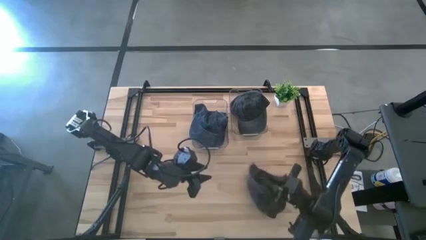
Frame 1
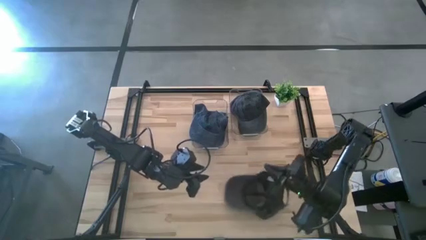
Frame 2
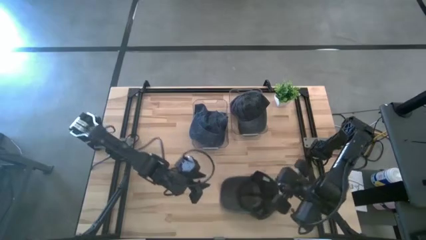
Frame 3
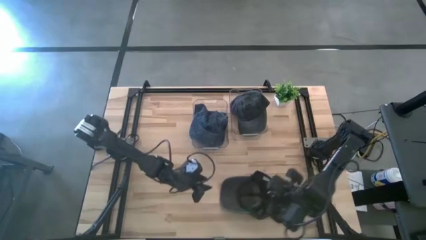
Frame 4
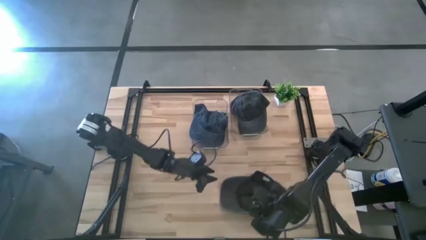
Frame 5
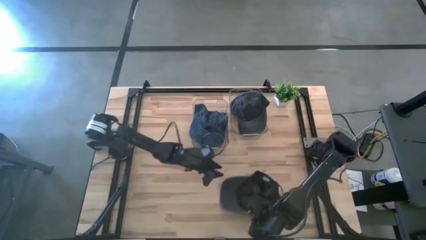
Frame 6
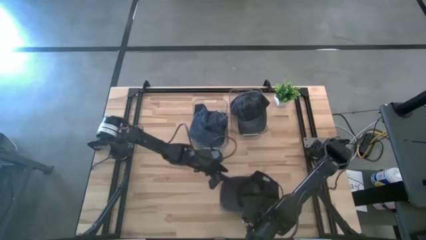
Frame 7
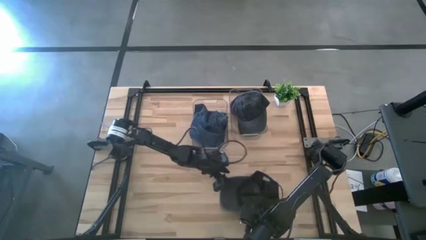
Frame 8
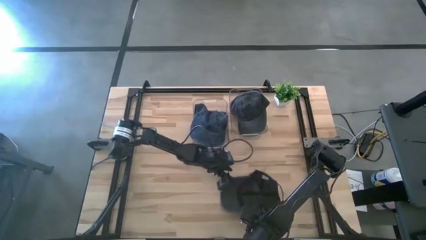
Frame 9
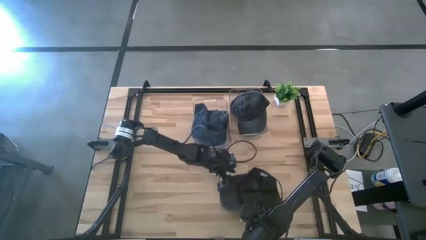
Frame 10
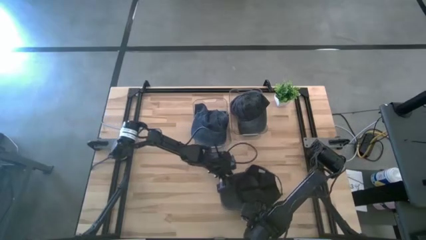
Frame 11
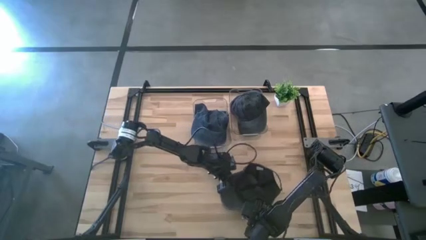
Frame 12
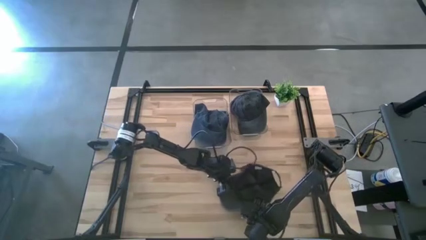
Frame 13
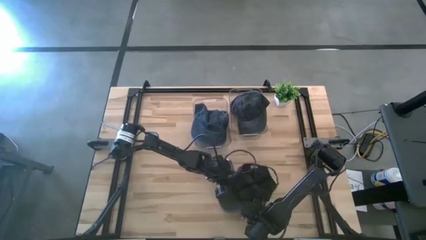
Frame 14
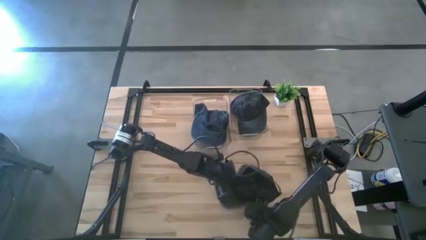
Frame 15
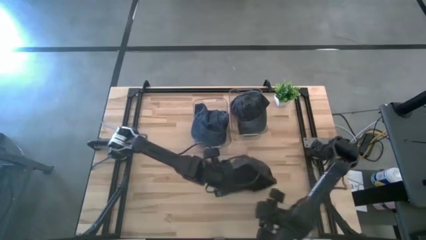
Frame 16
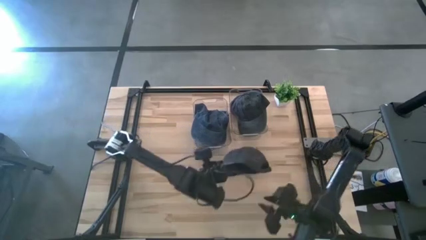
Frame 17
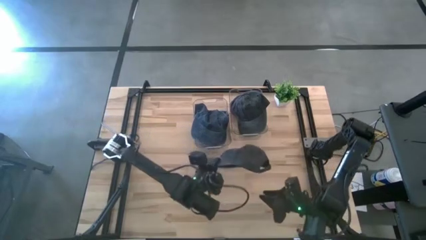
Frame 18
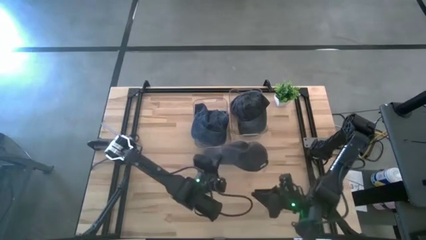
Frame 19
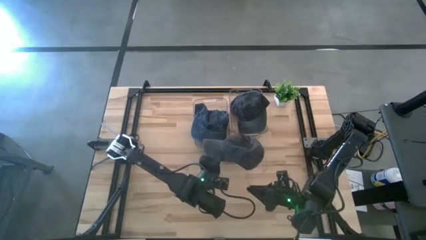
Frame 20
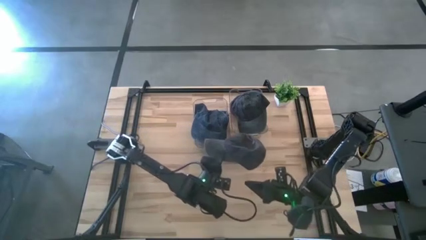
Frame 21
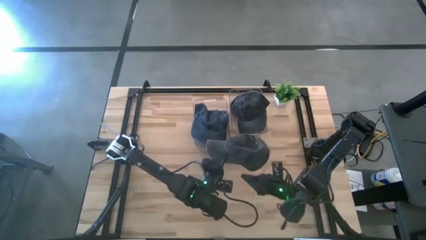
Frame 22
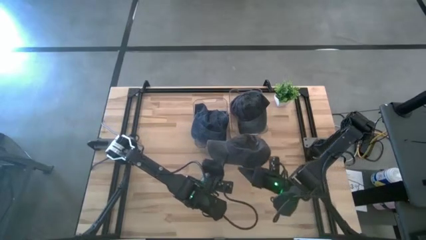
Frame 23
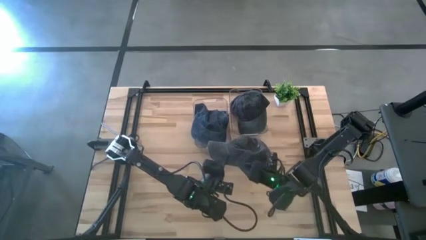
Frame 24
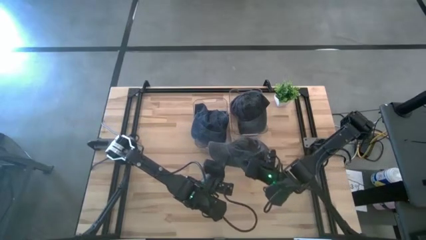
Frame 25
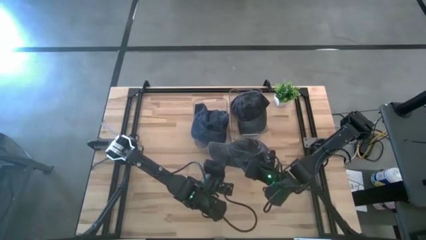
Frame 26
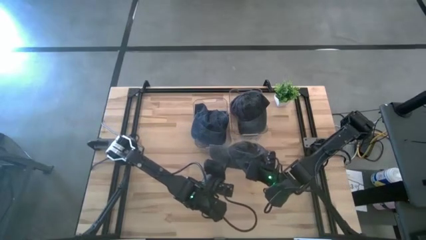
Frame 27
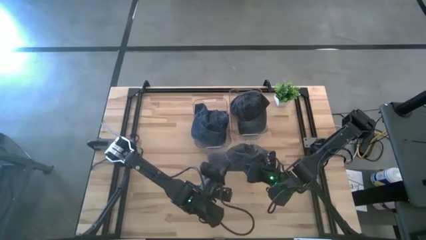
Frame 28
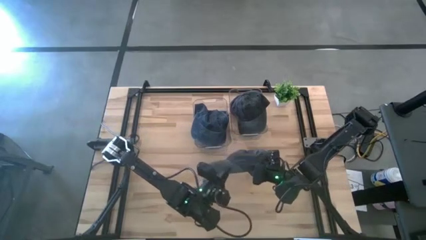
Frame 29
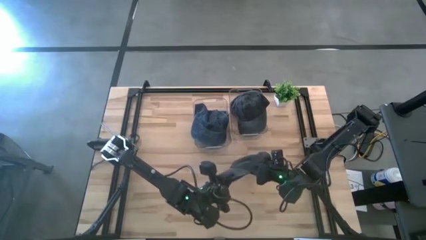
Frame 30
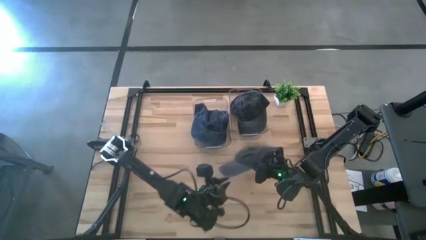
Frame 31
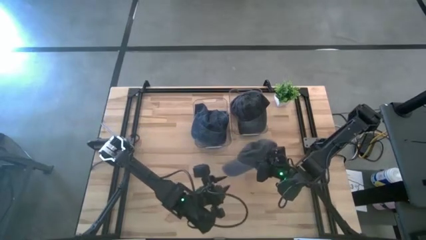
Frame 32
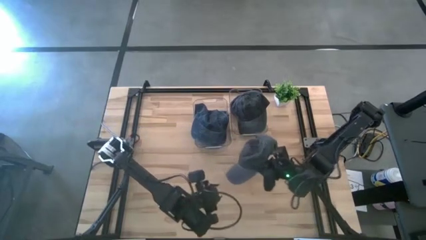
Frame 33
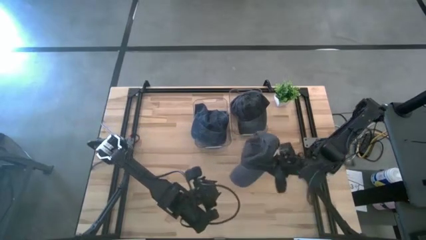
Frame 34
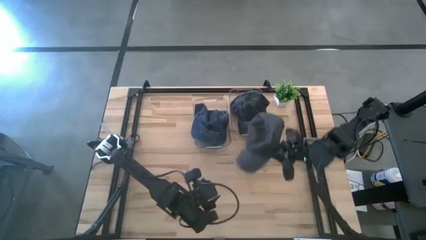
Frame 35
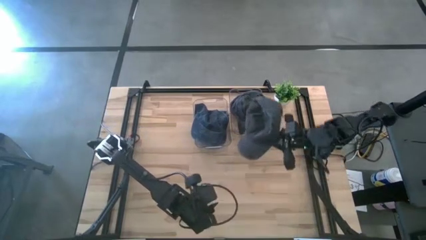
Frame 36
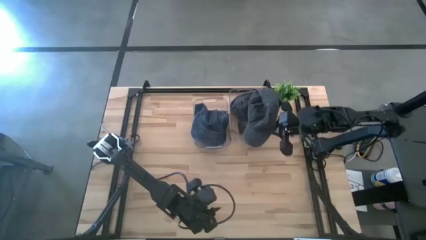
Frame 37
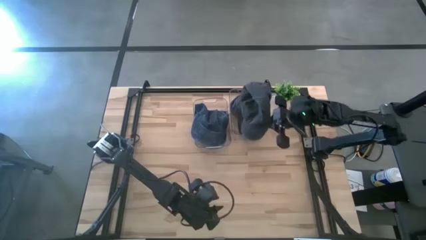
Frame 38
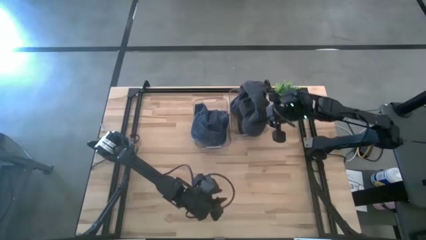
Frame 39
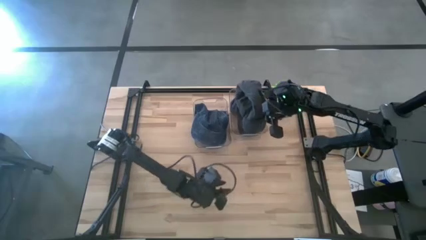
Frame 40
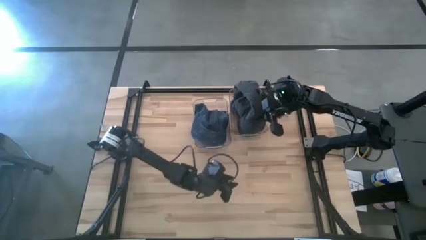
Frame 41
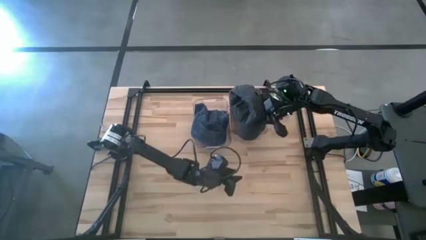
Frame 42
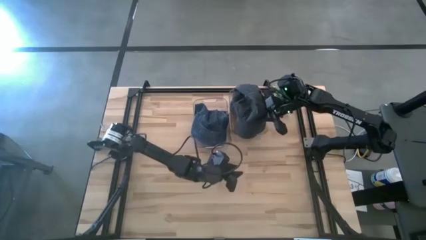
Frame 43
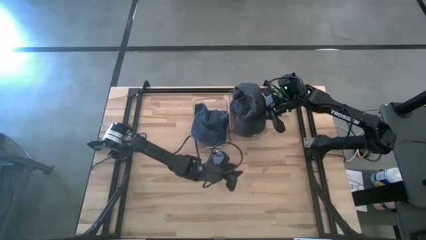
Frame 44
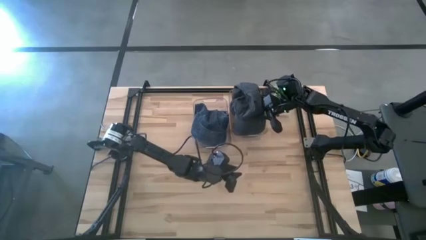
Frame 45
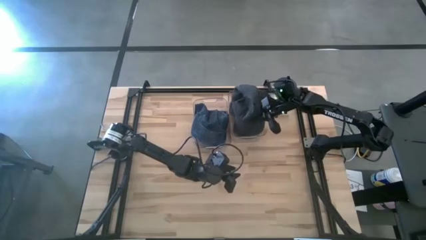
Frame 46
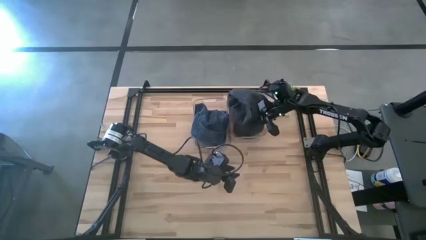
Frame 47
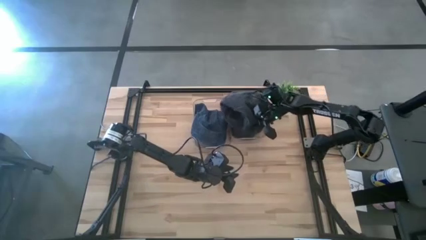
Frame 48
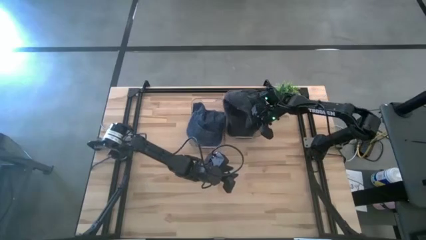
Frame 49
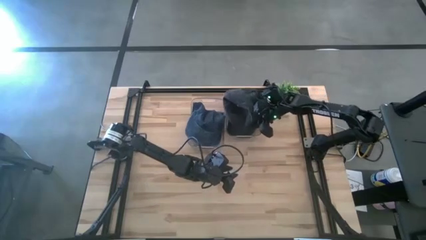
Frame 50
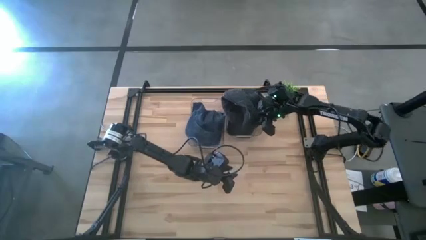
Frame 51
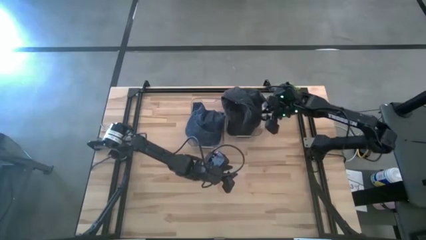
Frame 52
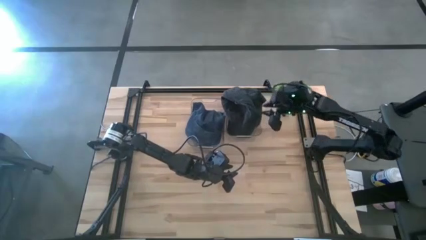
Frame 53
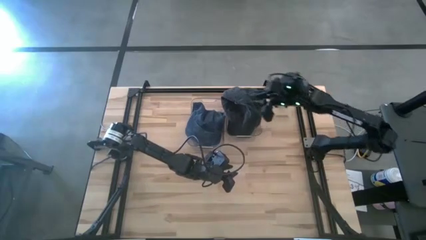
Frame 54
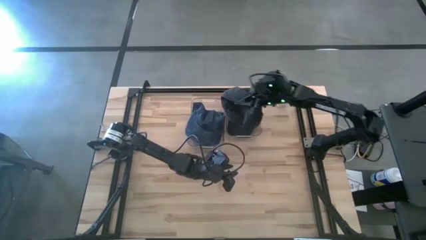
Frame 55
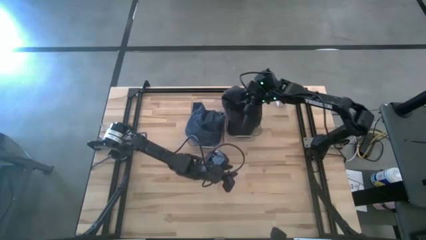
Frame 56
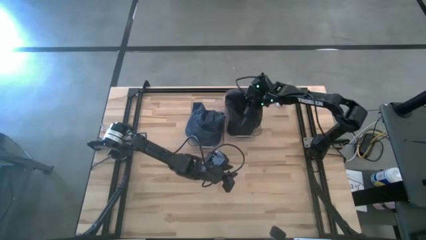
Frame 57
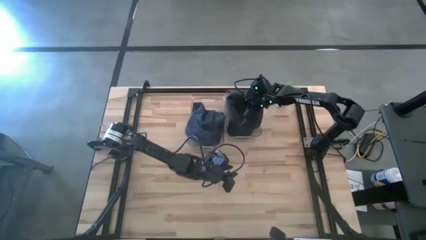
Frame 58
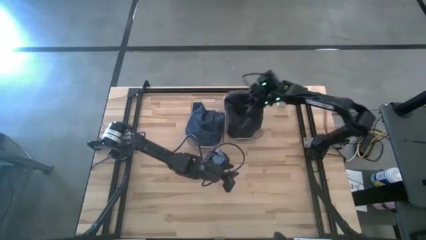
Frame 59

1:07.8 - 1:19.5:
Task: Pick & Place hat
Put the black cap into the right transparent bin

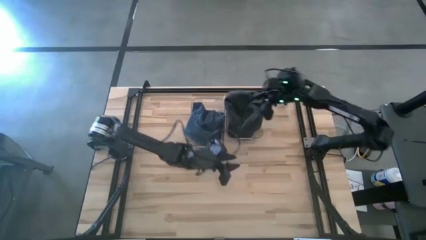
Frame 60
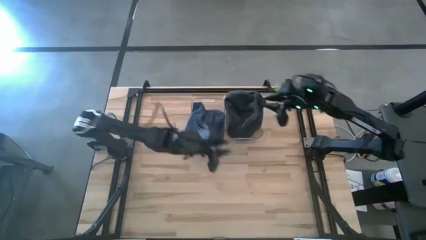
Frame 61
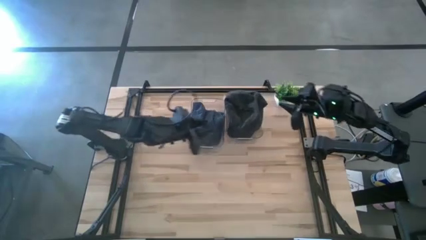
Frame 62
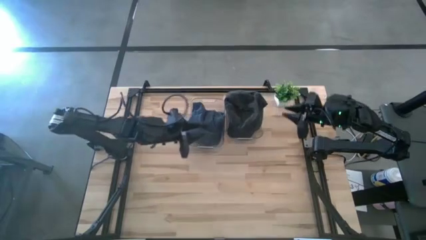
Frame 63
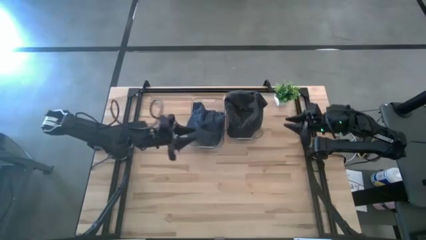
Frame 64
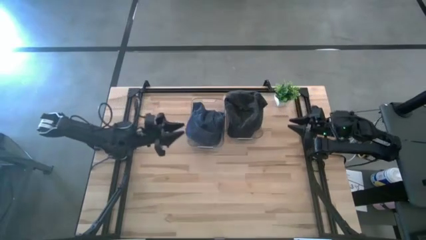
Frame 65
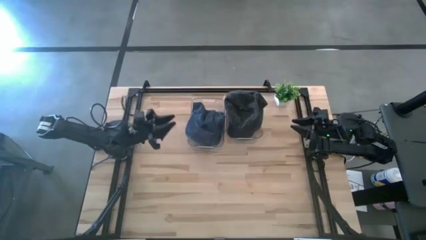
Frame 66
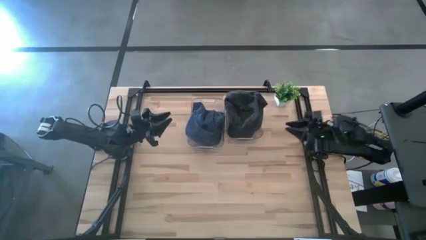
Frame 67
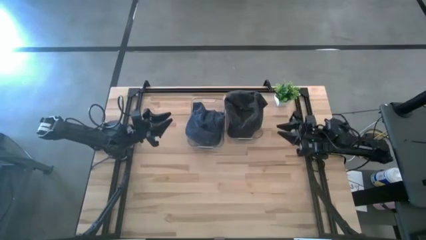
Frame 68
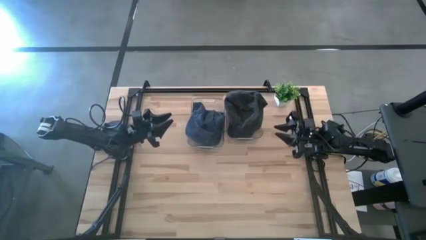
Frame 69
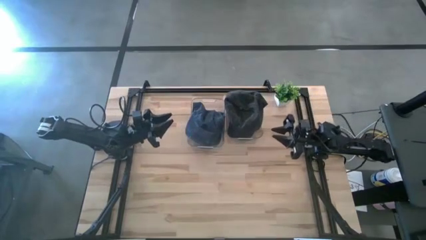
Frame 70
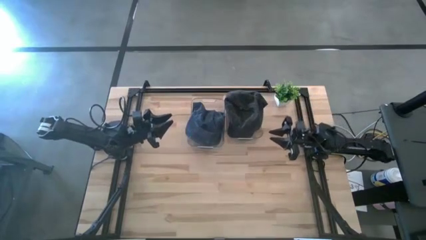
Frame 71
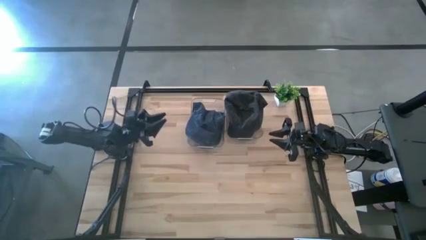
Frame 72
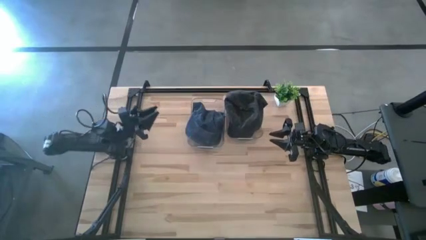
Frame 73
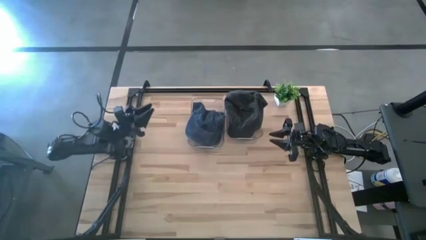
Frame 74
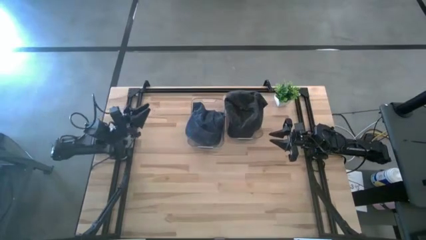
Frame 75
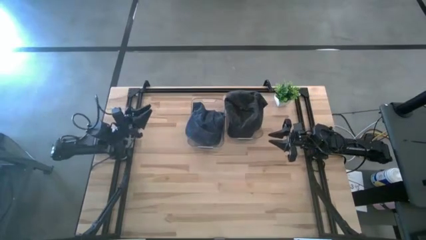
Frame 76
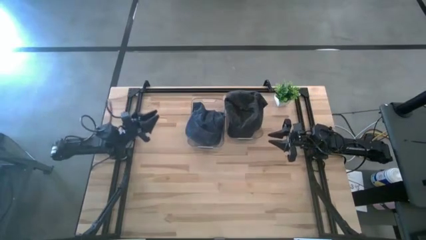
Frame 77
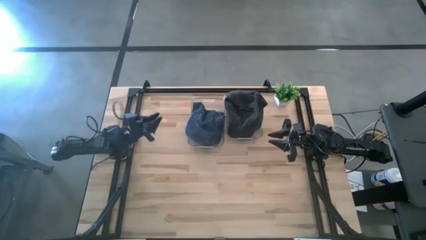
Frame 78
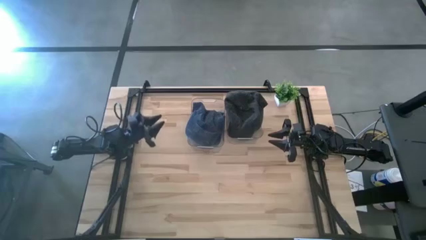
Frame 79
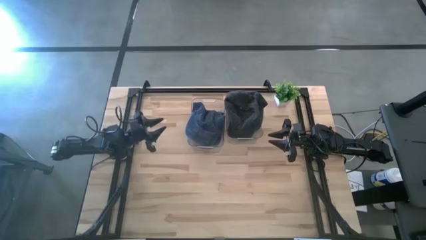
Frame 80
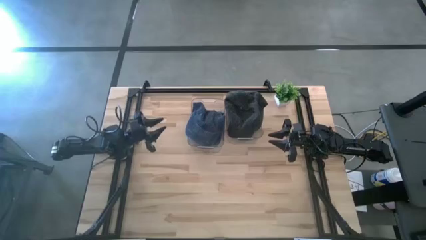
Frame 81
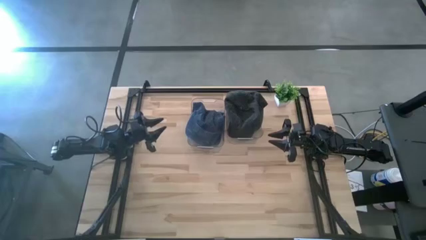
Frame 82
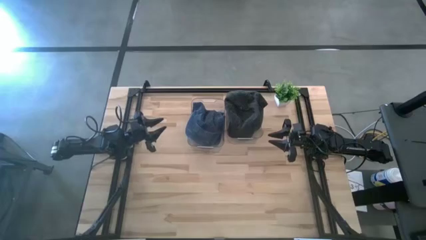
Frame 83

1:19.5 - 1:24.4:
Return to Home Position
